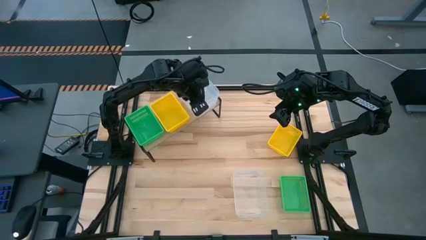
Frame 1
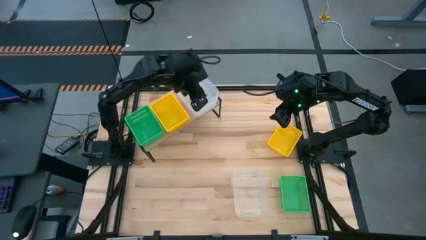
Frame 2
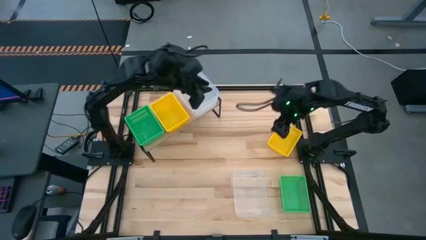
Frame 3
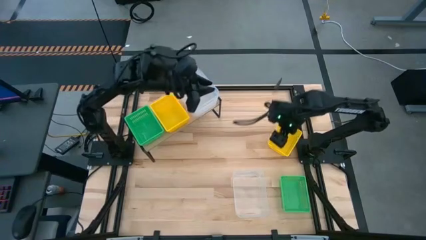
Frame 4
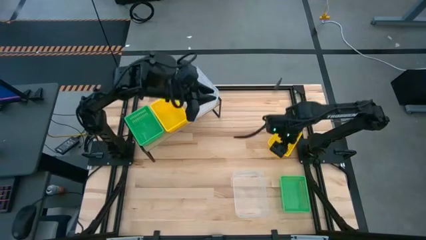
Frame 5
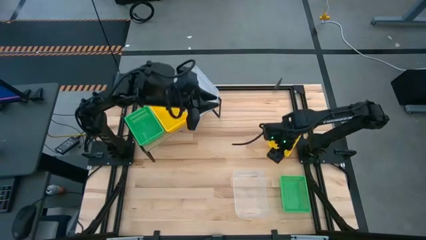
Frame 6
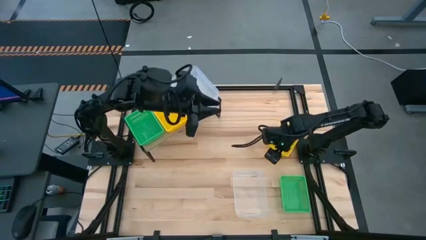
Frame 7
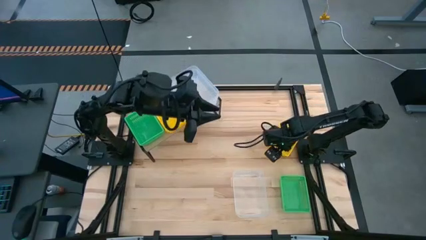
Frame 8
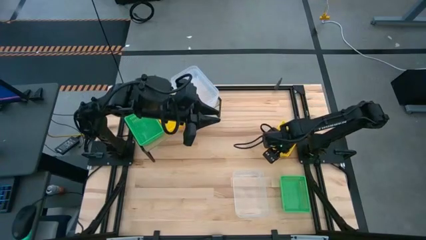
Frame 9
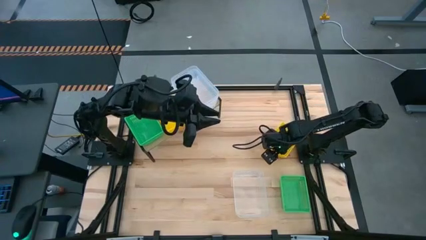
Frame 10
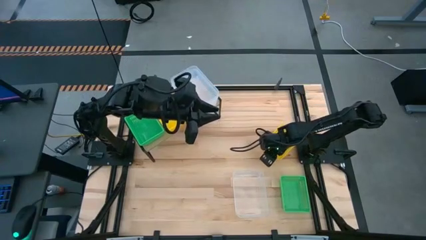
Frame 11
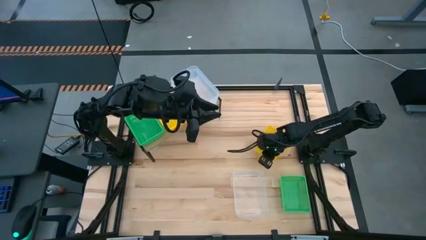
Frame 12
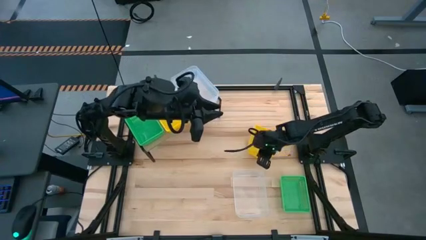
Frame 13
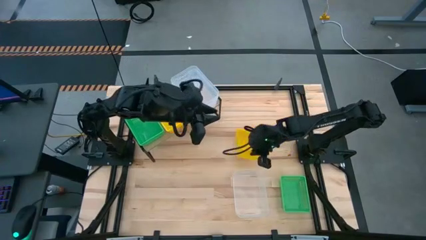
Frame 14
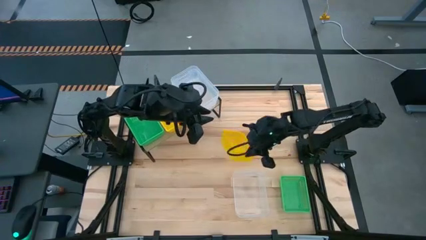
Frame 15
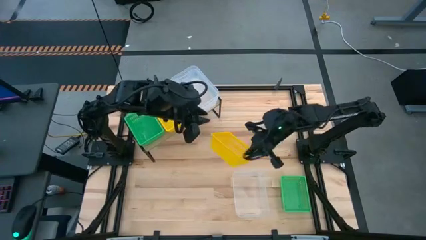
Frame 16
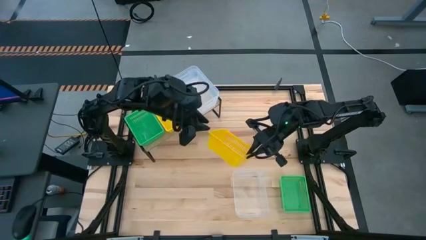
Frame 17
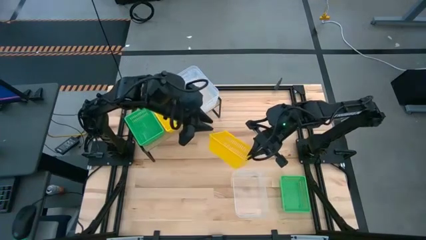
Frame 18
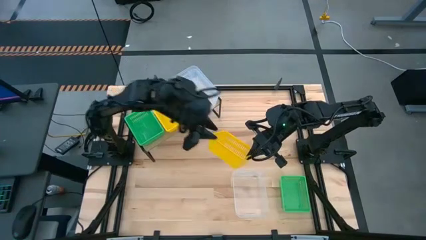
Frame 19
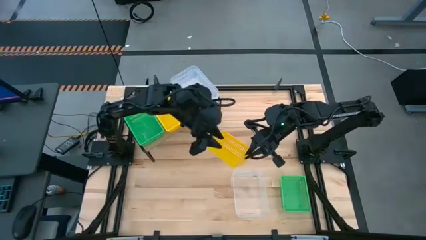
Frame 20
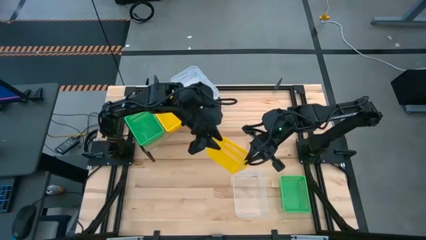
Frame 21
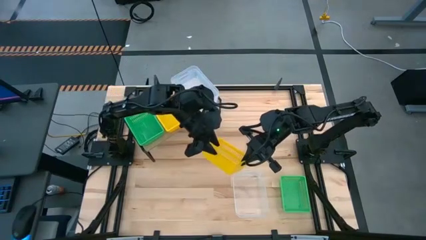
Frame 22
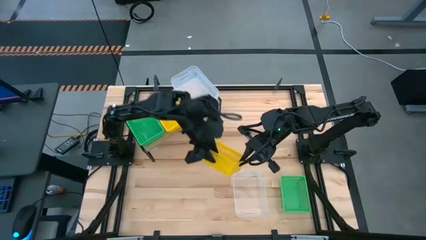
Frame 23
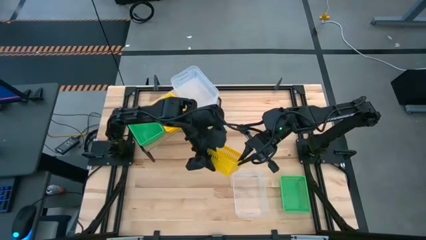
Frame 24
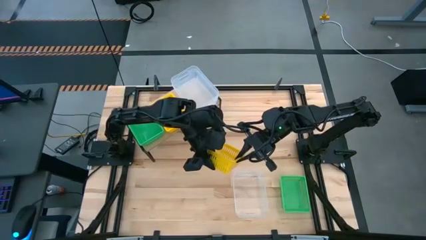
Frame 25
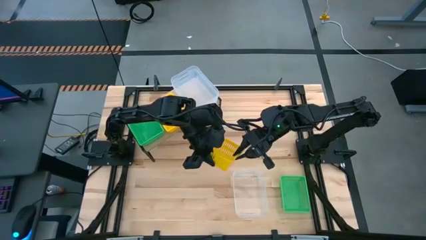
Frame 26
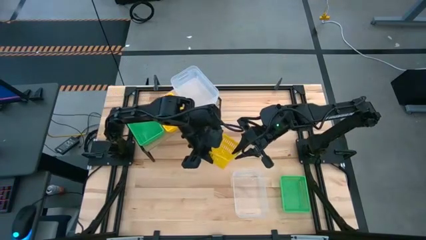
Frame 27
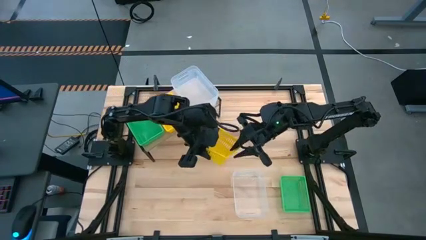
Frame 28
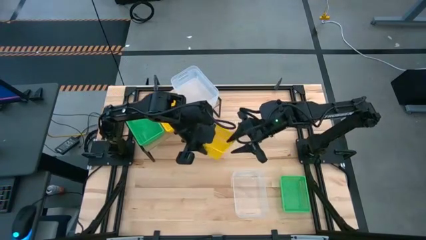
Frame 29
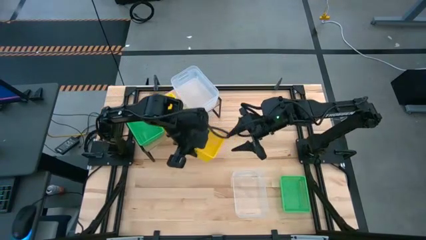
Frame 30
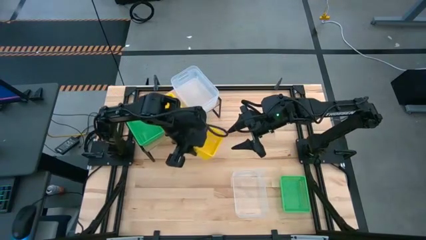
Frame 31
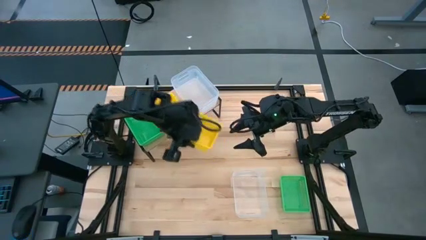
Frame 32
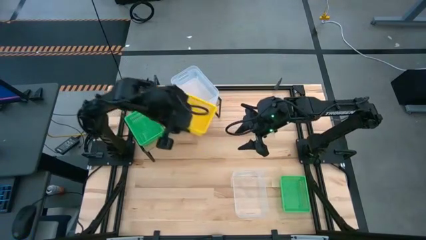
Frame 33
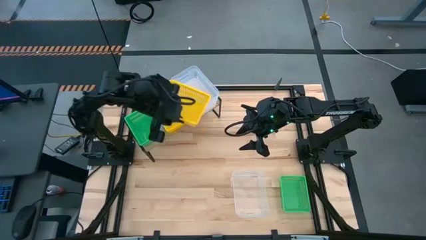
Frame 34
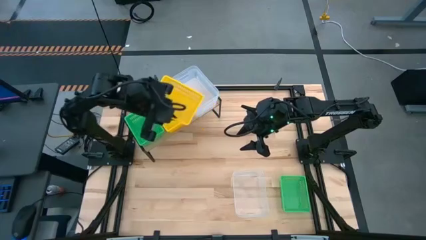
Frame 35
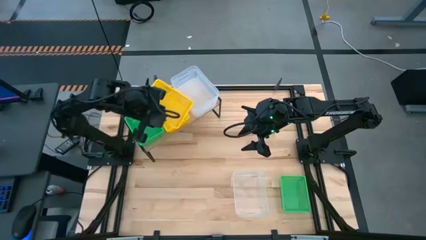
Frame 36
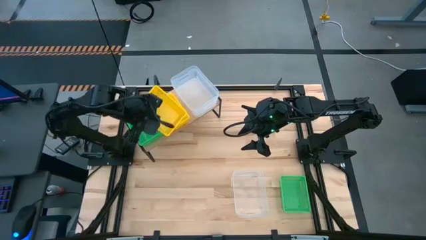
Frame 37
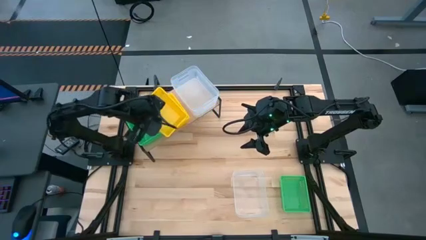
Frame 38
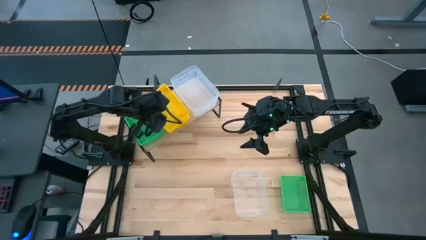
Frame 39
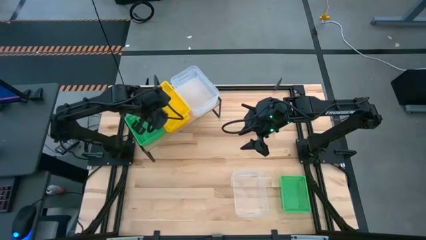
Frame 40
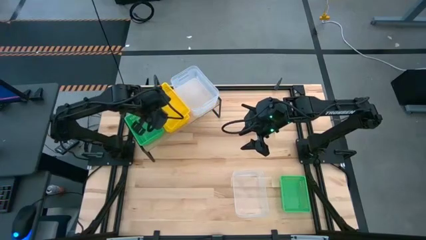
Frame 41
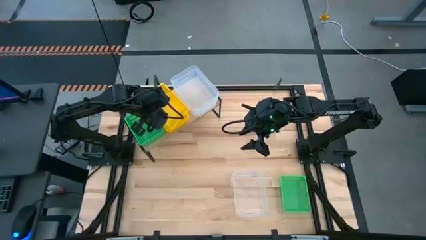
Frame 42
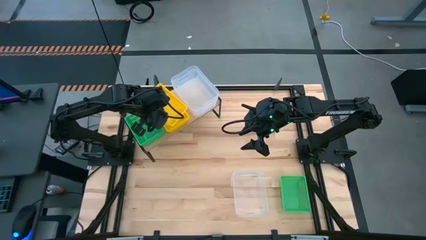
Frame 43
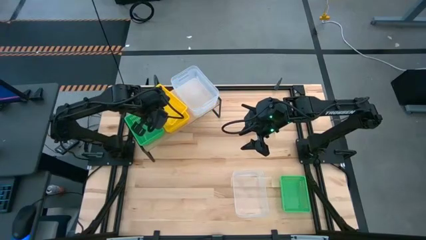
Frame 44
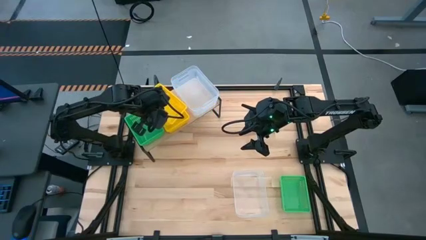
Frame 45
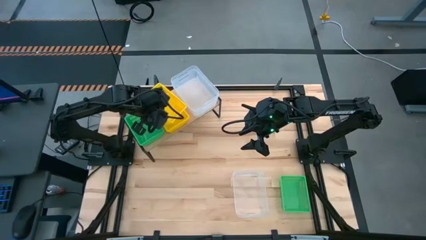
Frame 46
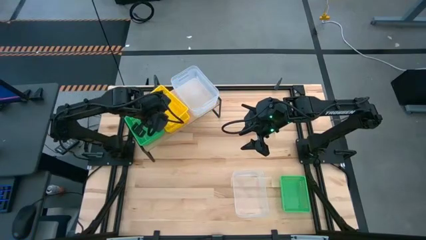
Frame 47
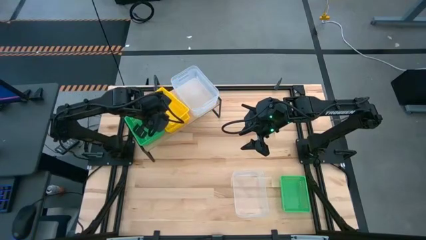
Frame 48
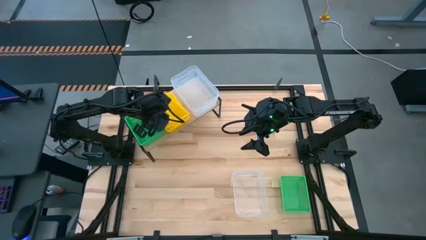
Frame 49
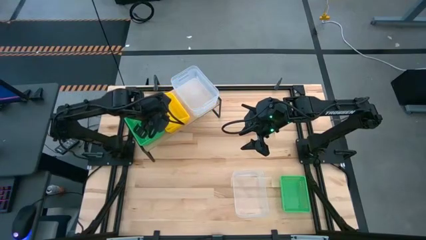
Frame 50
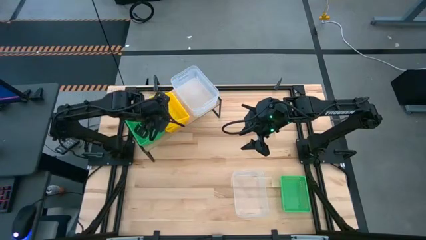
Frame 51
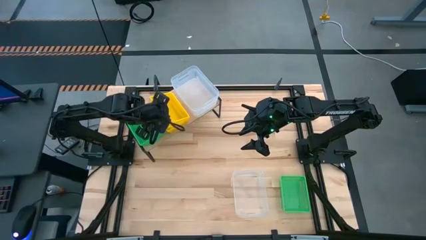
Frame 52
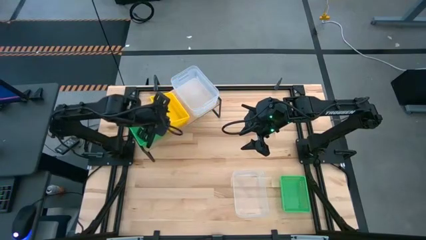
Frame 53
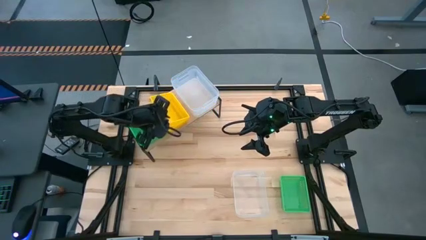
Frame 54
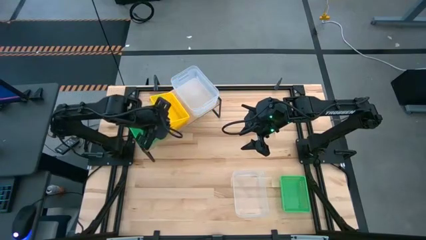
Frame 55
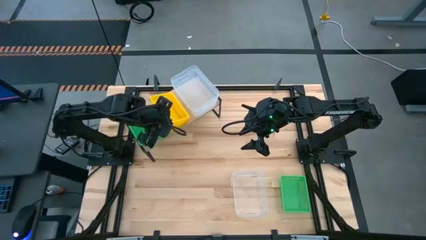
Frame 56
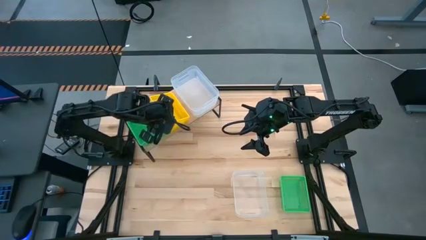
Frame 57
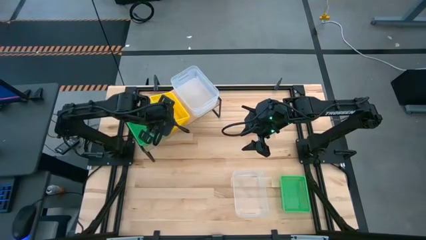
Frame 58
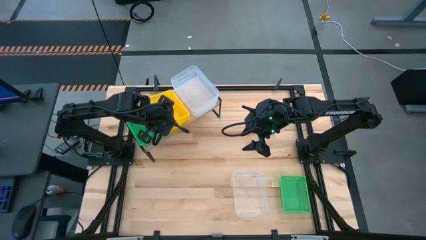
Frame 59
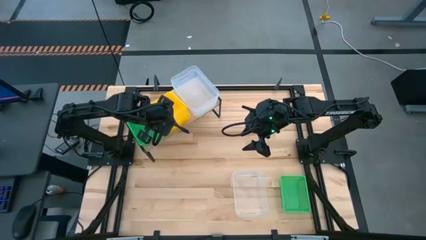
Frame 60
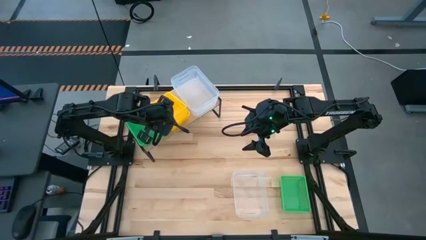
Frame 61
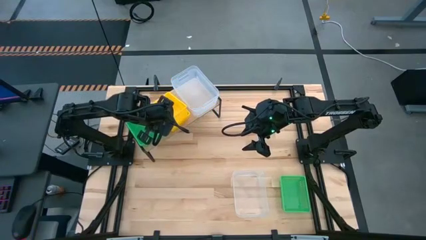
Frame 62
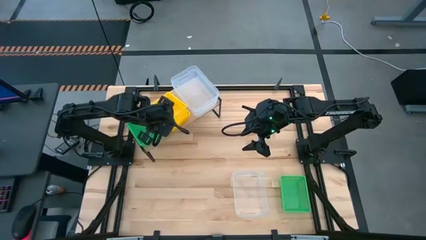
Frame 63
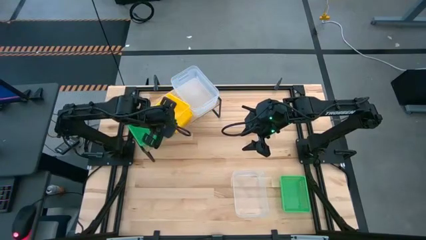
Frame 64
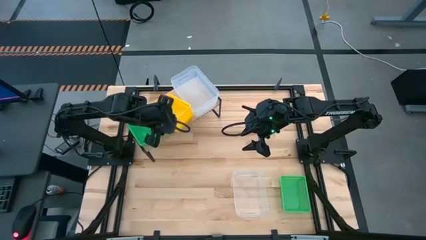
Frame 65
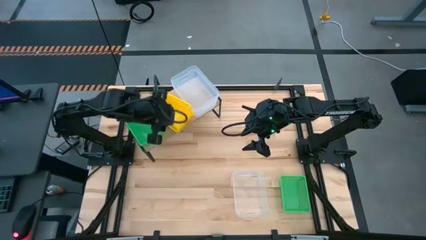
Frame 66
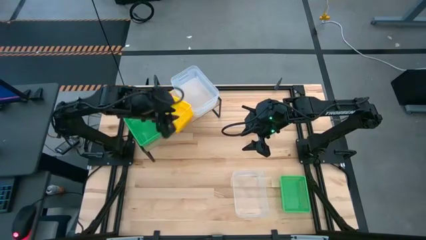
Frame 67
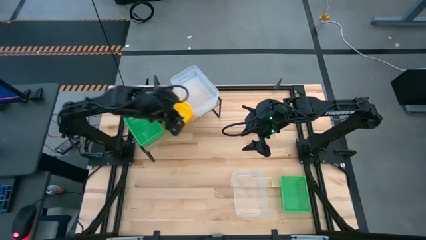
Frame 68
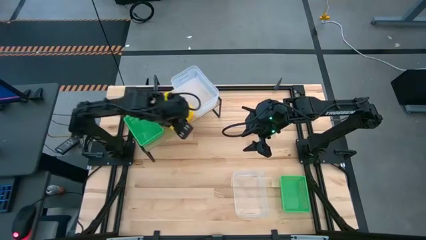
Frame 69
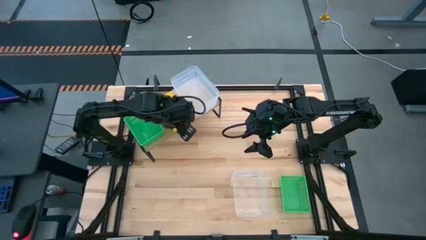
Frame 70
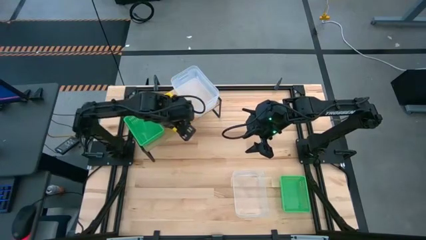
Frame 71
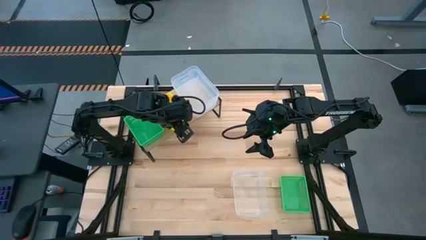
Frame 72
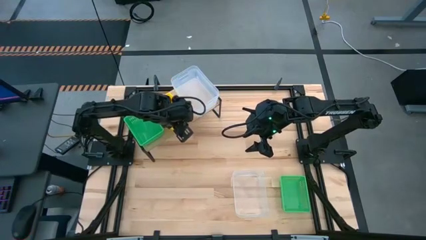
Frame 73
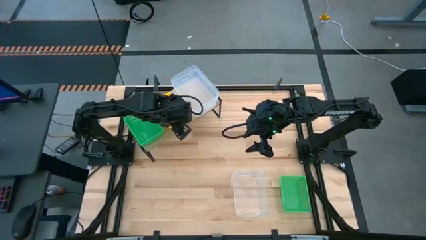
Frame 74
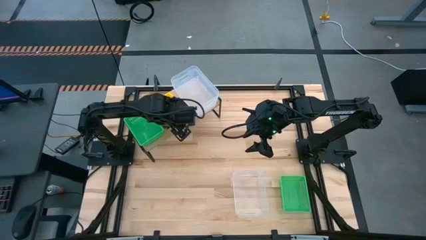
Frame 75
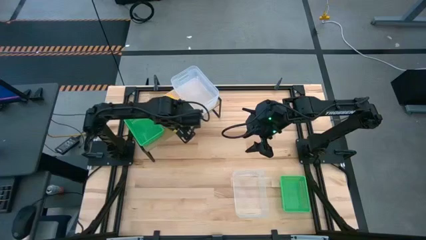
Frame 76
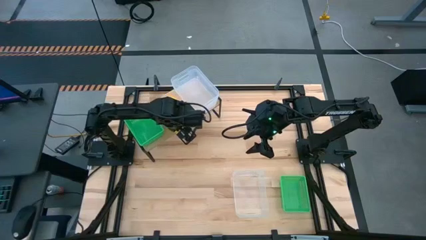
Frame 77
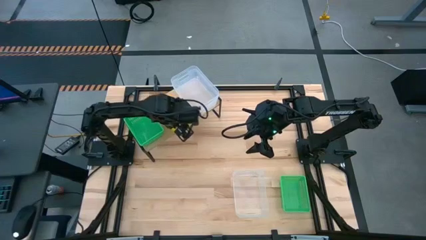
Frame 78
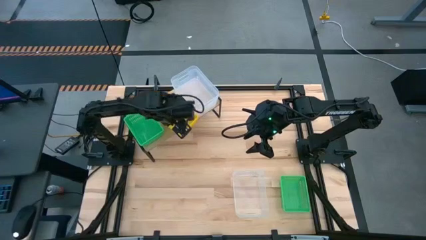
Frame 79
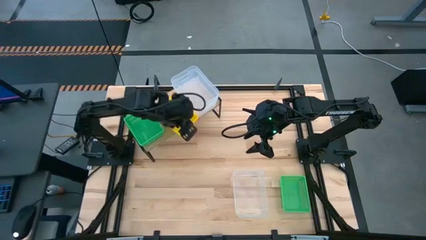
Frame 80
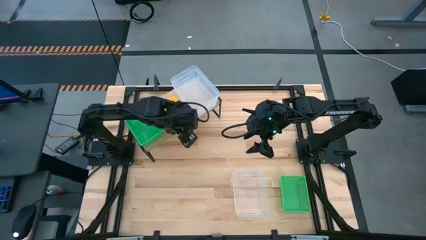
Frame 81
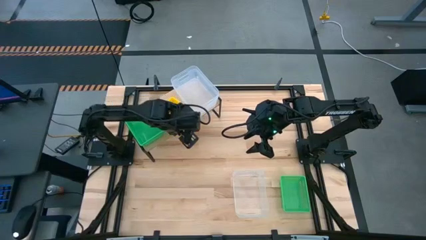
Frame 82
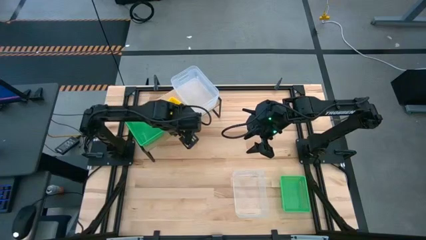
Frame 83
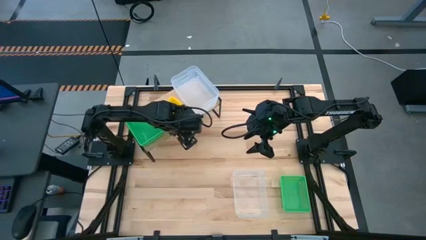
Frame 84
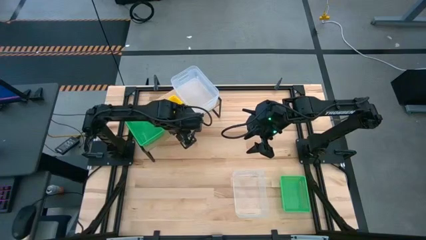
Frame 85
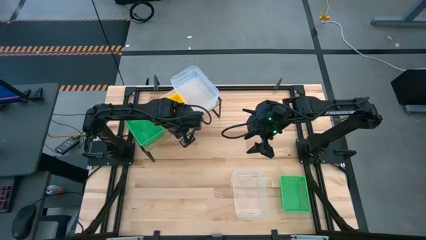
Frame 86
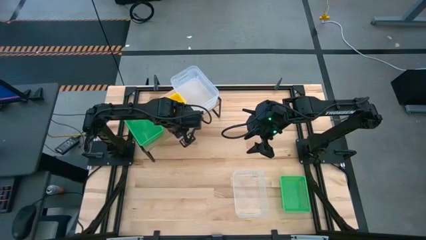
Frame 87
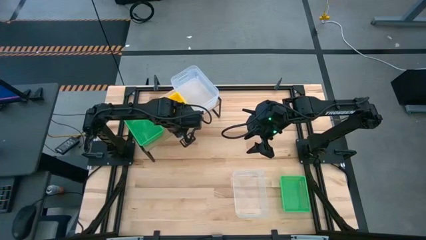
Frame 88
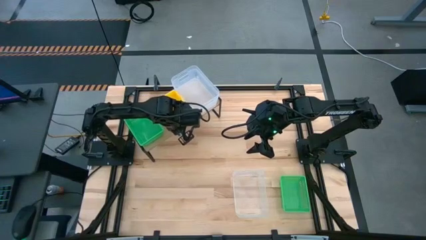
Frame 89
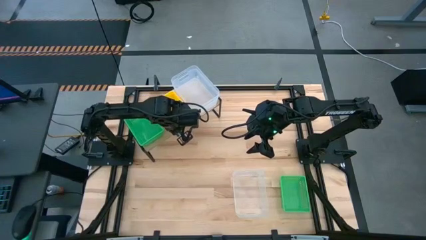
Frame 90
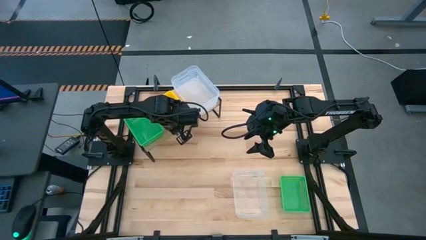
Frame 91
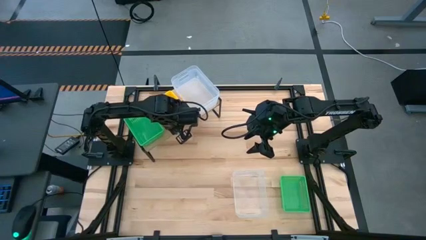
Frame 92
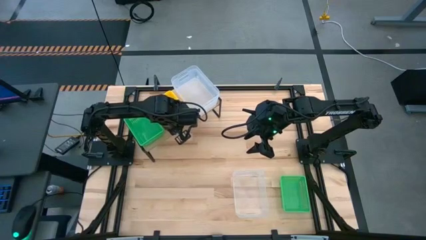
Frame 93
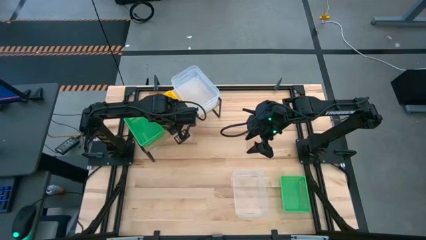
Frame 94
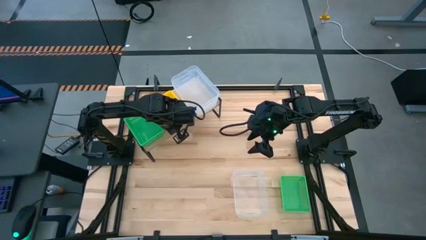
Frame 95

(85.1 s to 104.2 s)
Task: Stack baskets on shelf by color
Stack the yellow bin on top of the other yellow bin on the shelf
